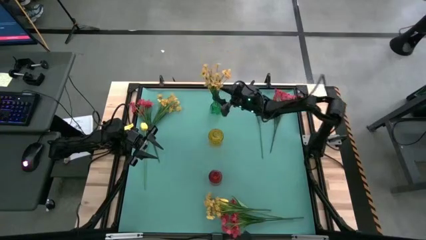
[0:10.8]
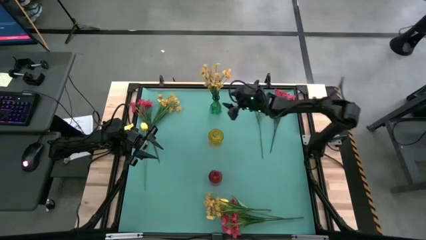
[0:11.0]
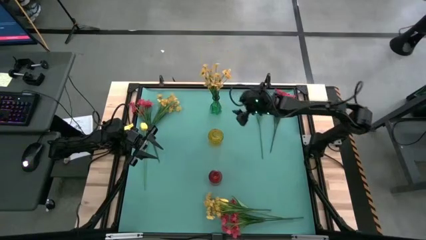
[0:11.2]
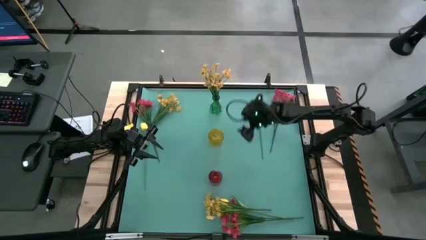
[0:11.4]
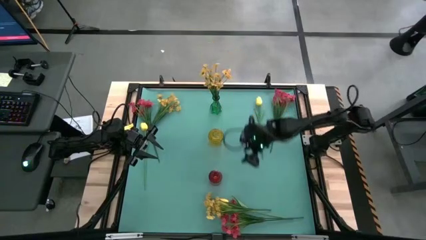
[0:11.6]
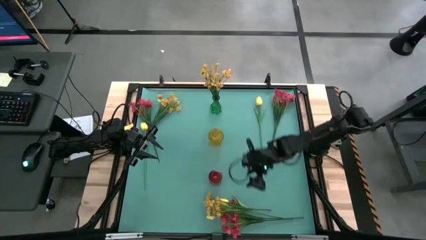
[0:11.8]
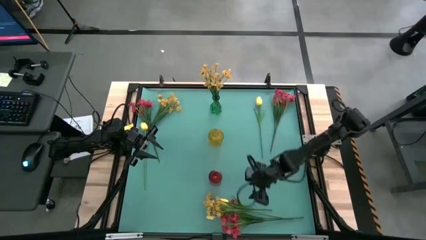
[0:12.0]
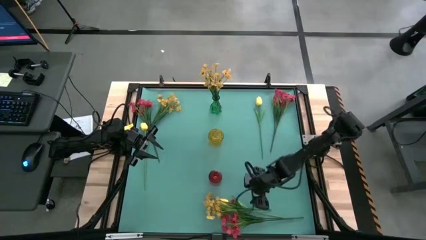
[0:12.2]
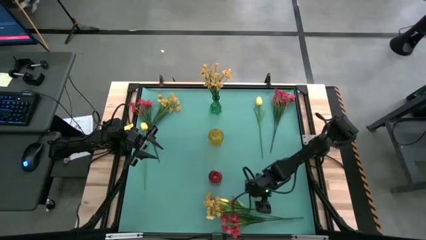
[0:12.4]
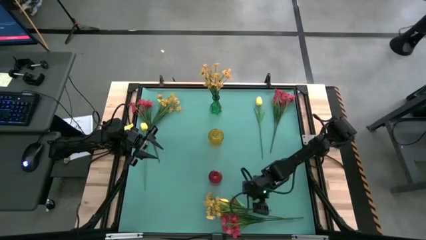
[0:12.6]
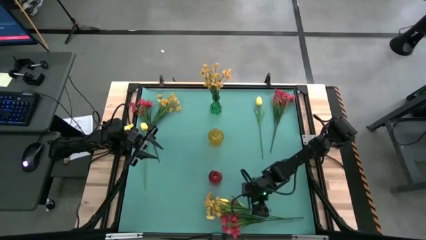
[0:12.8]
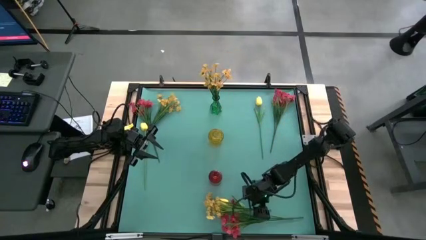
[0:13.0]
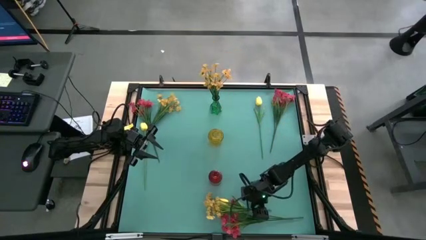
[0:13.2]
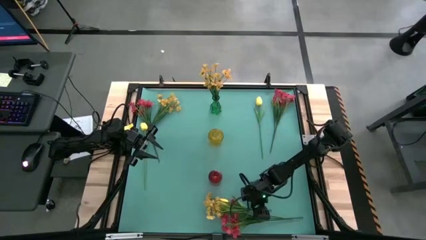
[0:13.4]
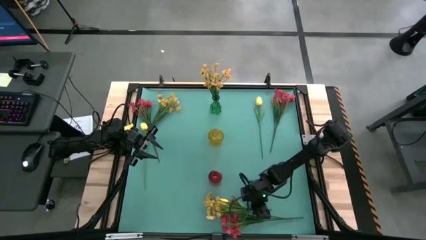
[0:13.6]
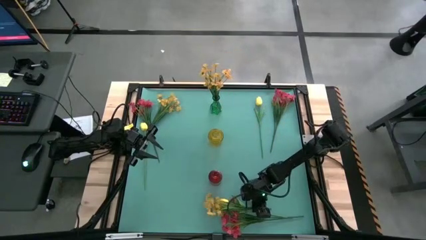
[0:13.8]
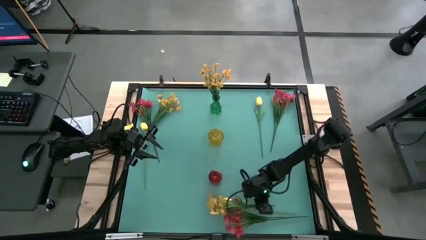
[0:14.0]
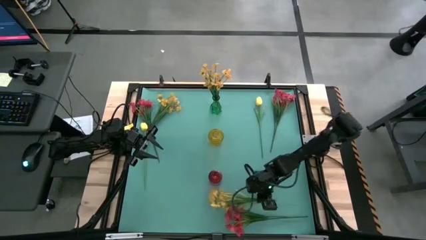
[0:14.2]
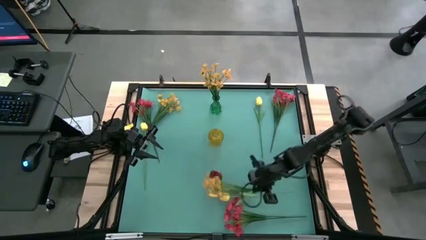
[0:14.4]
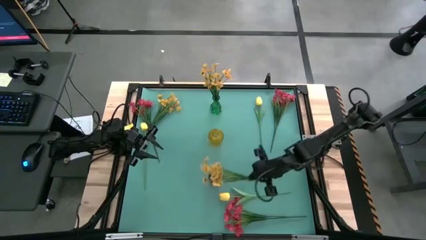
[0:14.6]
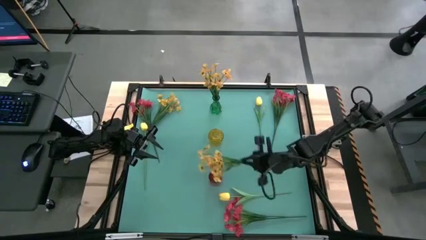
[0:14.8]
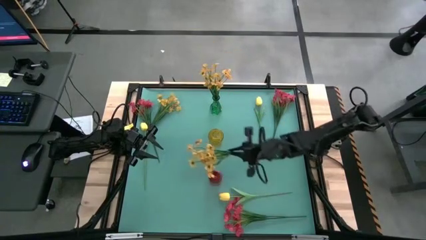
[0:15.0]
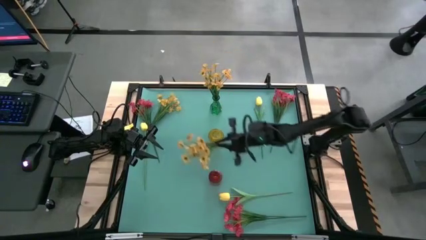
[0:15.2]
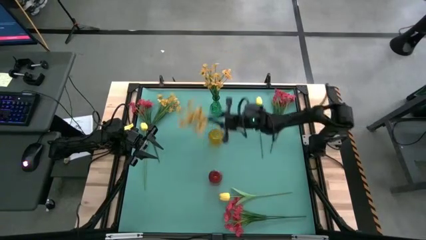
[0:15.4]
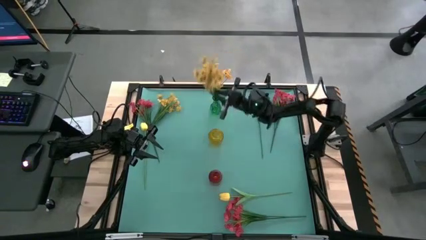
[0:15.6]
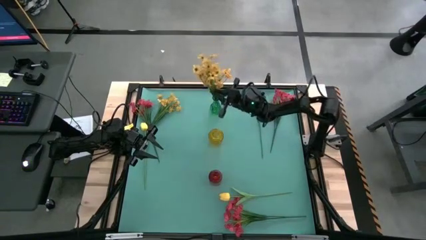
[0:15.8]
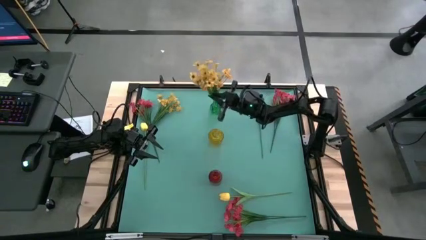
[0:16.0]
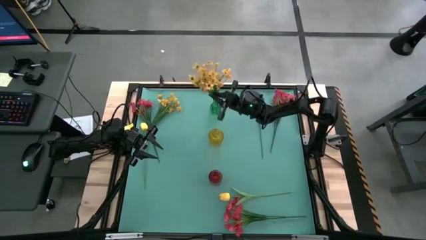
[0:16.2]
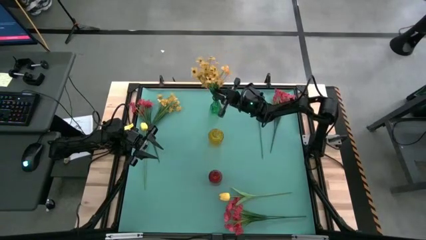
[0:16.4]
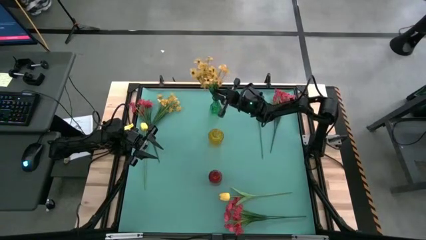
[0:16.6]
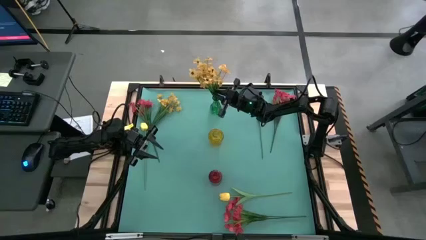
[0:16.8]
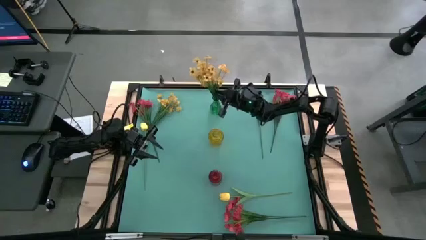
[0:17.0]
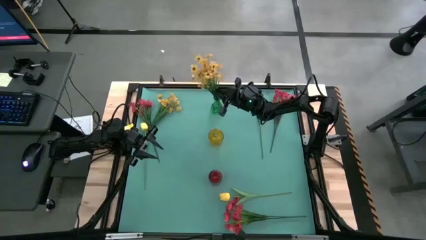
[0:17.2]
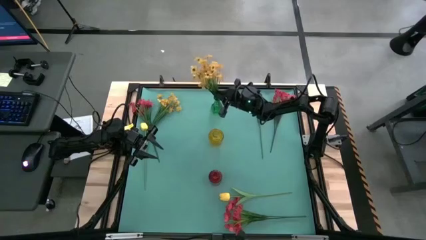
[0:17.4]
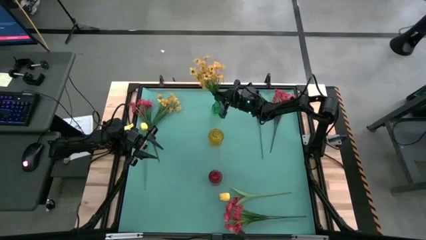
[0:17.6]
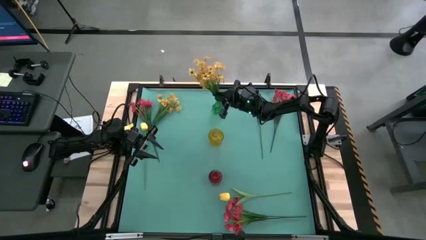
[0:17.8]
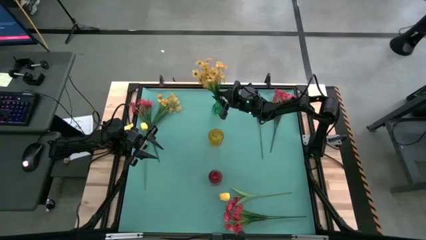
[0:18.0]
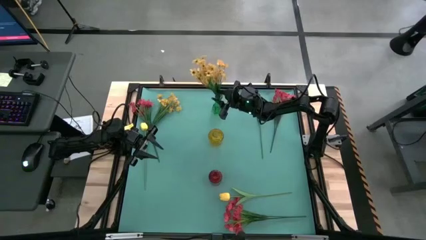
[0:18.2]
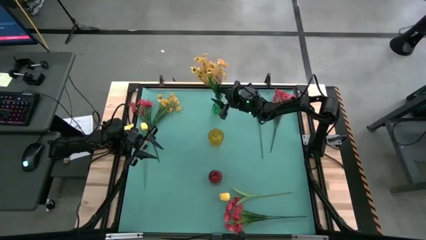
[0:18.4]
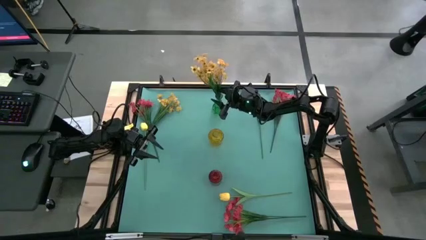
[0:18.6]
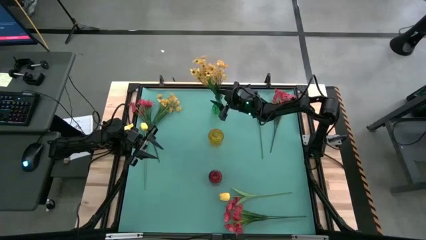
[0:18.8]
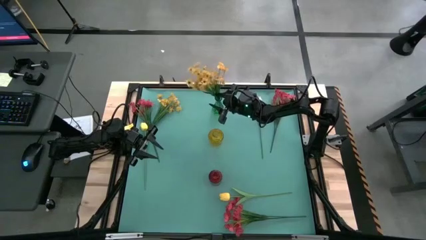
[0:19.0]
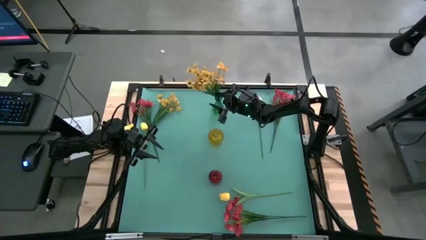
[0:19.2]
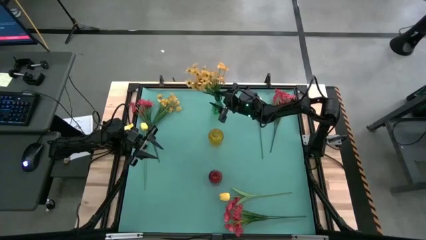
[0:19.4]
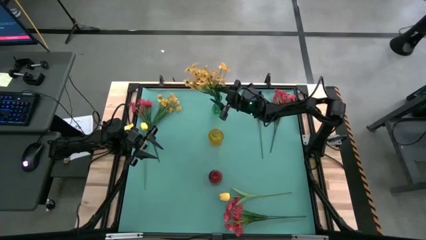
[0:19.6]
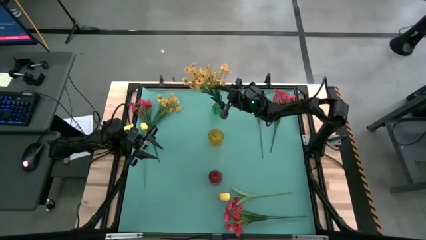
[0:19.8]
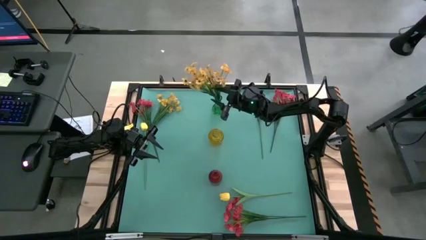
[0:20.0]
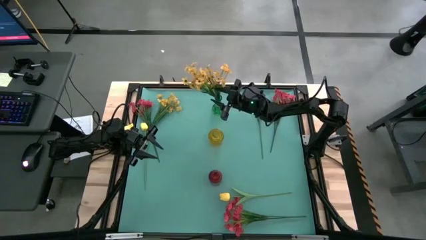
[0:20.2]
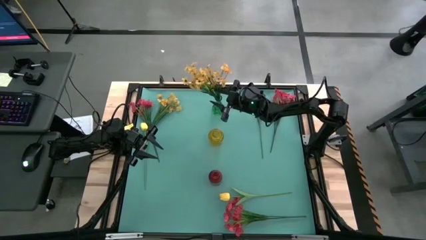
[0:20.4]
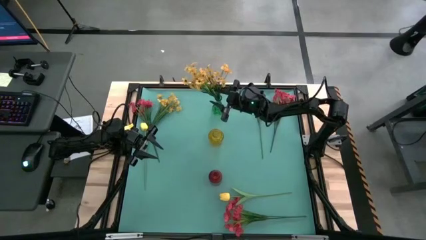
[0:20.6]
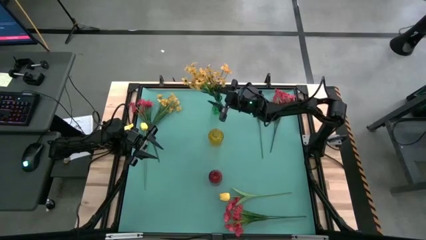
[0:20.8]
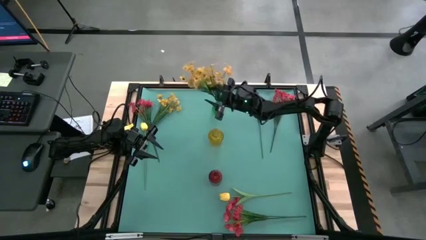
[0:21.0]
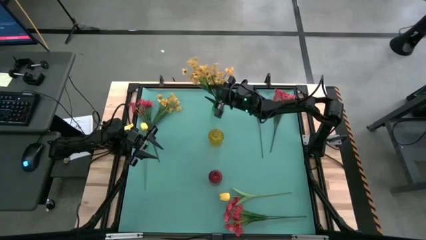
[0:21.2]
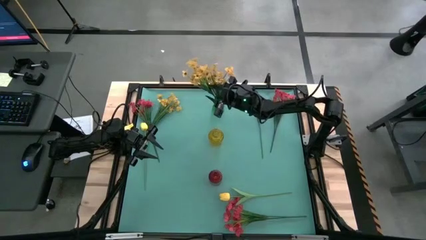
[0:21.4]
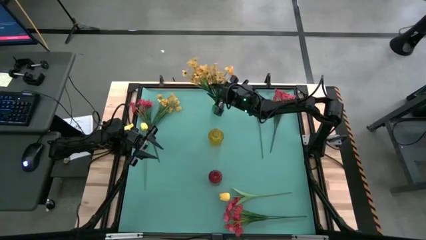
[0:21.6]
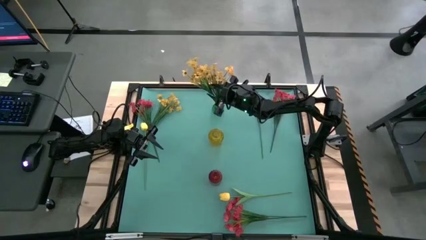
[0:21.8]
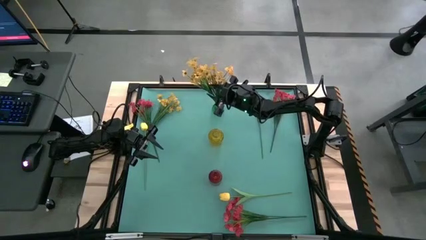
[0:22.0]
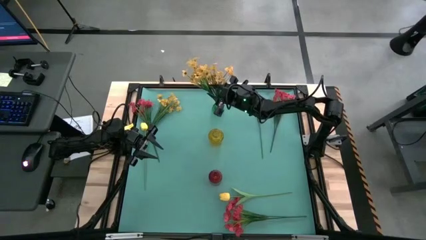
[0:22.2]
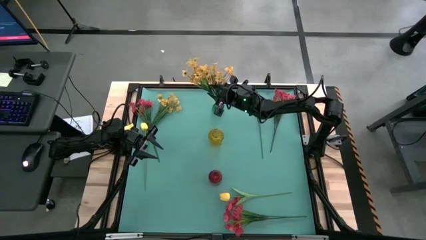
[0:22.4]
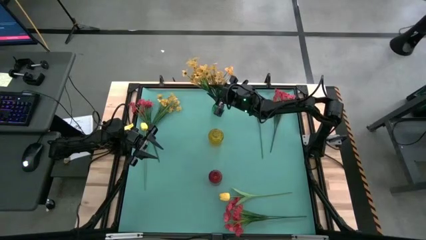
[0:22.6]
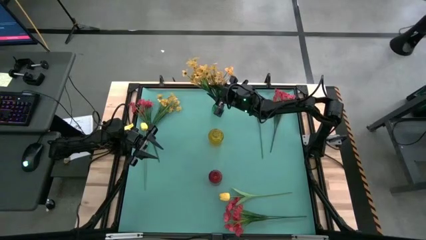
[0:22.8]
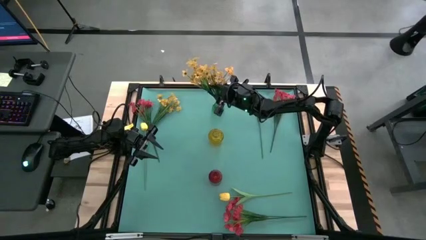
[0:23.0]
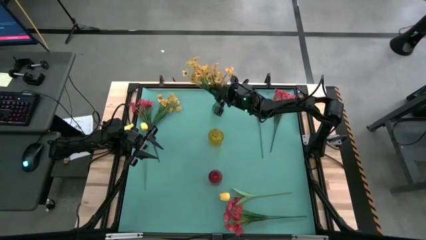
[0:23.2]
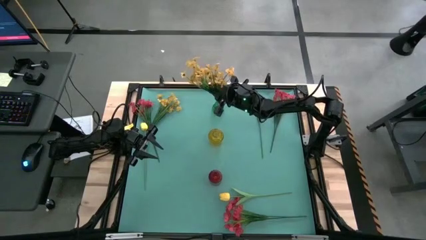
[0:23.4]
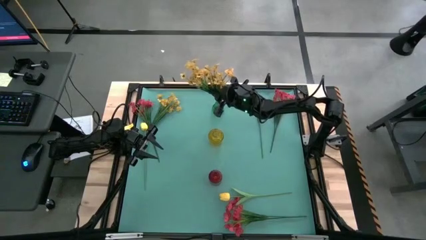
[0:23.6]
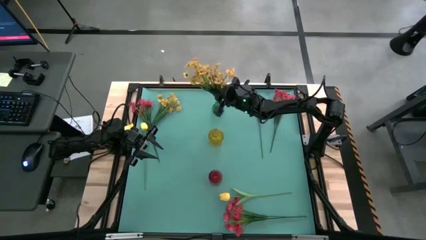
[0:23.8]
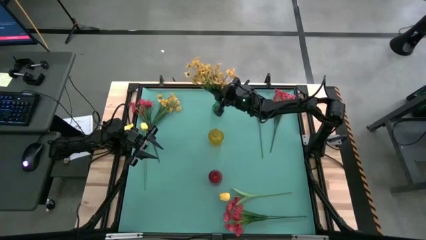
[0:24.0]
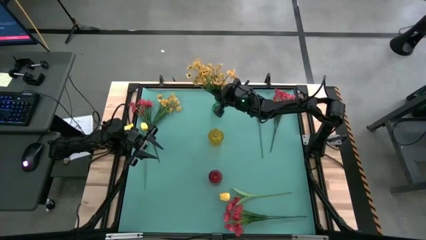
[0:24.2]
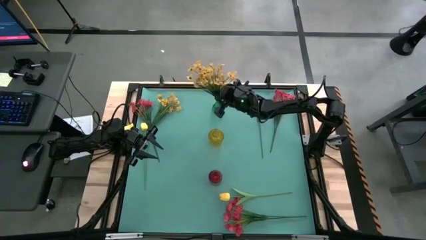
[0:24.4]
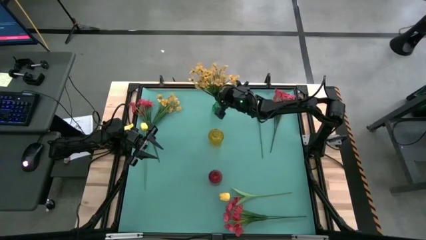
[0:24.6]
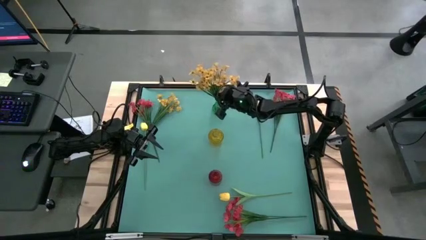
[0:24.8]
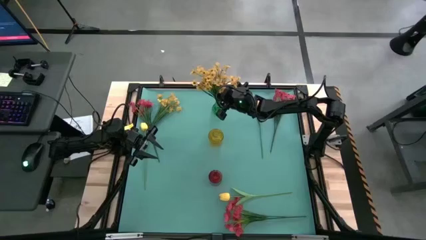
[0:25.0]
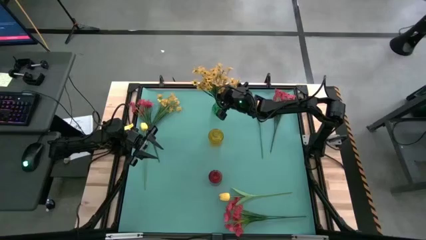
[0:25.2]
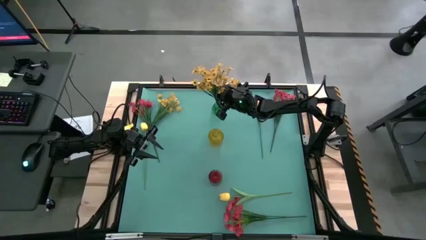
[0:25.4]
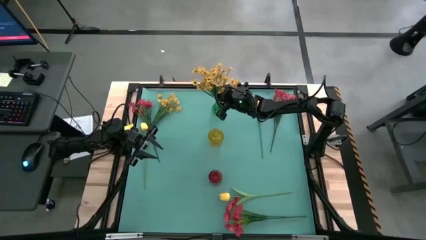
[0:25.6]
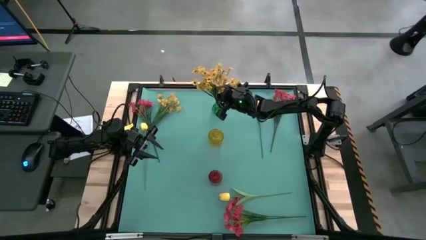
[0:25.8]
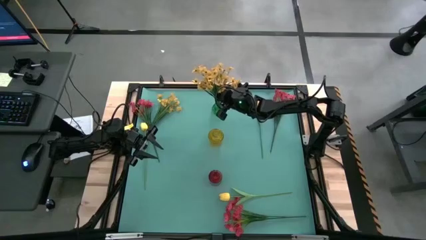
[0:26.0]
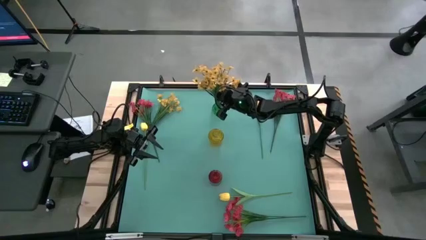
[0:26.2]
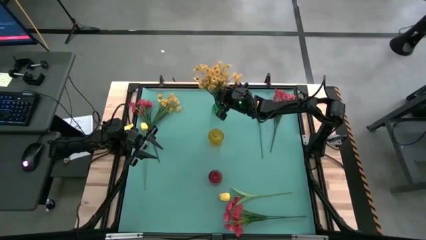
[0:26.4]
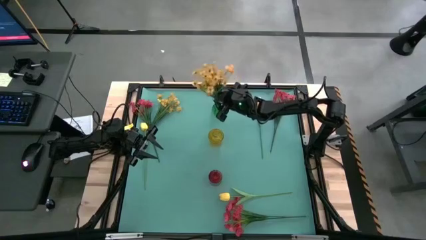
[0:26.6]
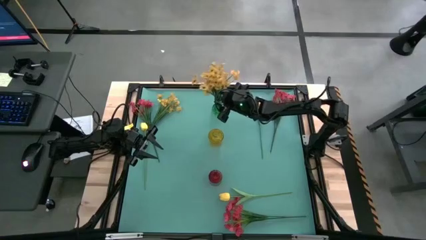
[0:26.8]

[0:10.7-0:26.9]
Task: Sort flowers into vase by color
Put the bottom yellow flowers into the green vase
